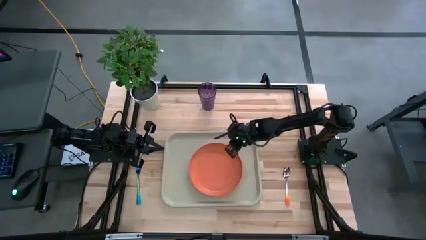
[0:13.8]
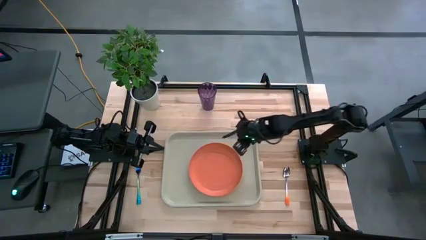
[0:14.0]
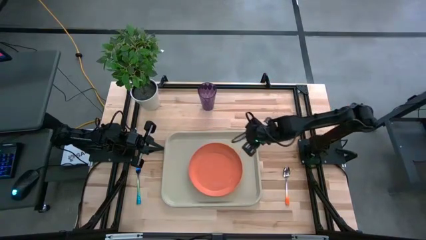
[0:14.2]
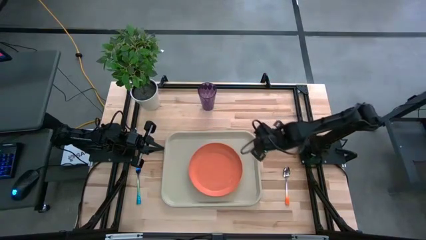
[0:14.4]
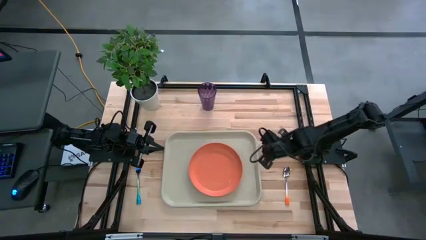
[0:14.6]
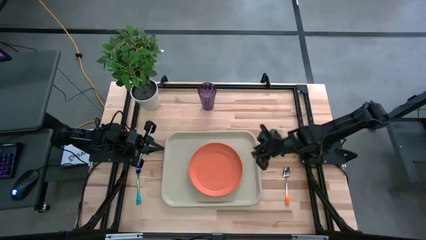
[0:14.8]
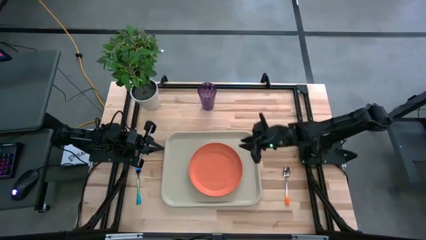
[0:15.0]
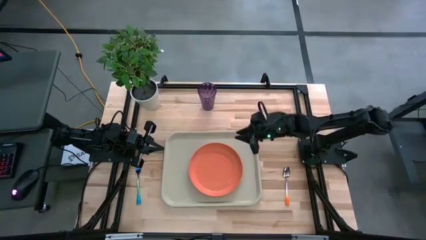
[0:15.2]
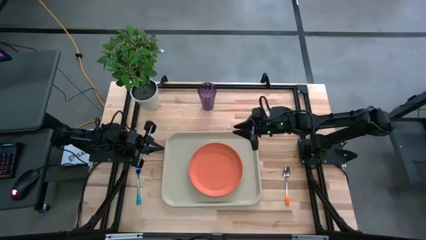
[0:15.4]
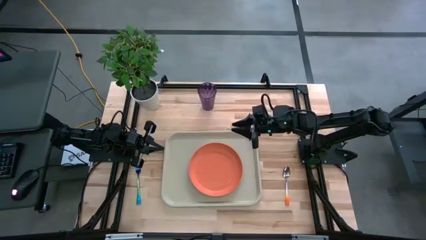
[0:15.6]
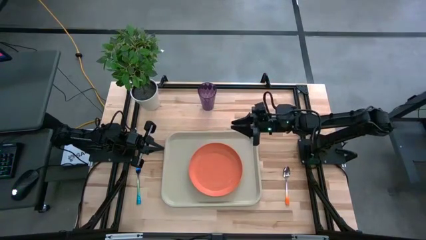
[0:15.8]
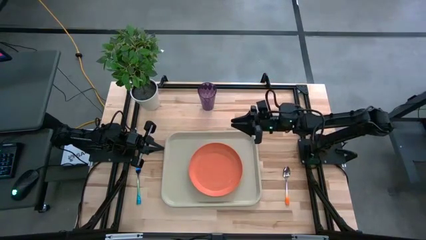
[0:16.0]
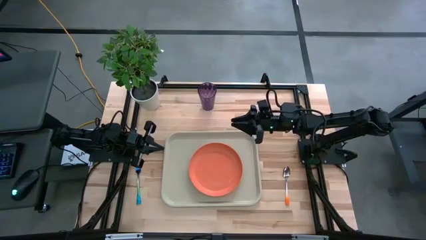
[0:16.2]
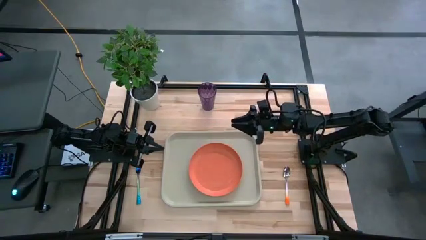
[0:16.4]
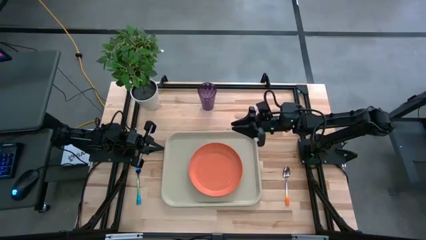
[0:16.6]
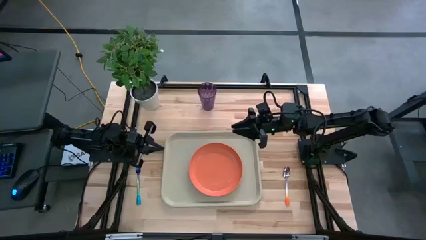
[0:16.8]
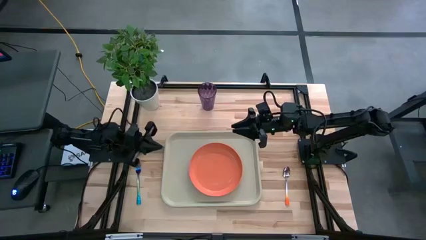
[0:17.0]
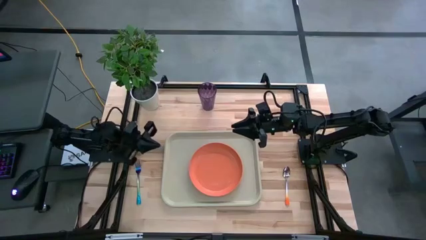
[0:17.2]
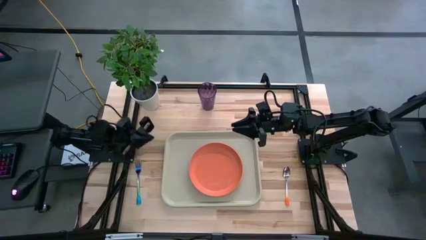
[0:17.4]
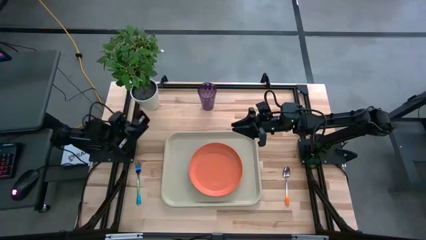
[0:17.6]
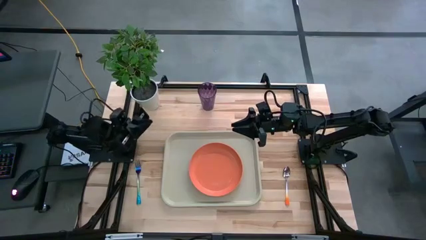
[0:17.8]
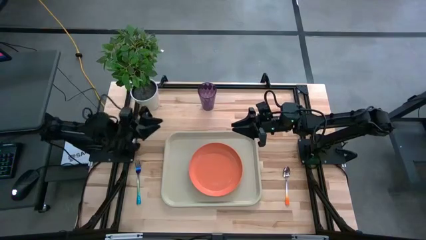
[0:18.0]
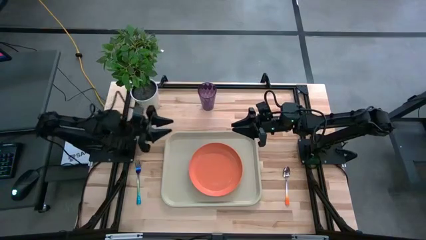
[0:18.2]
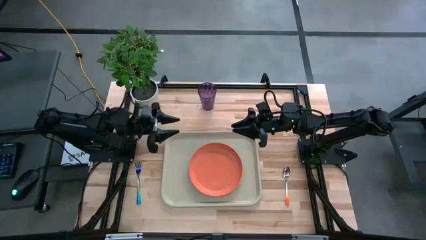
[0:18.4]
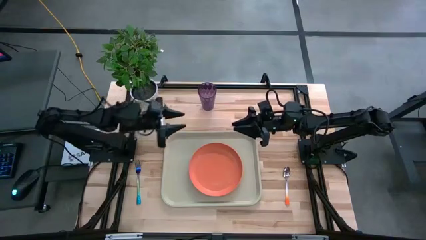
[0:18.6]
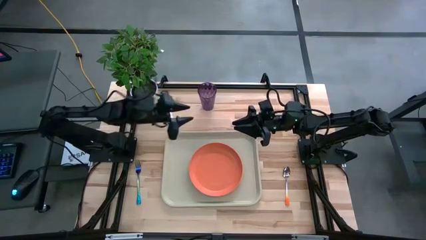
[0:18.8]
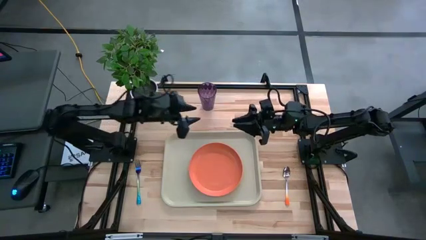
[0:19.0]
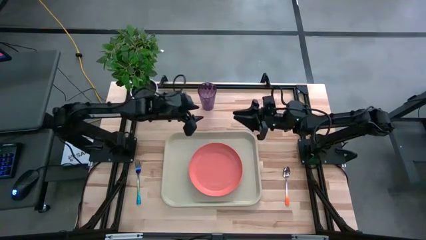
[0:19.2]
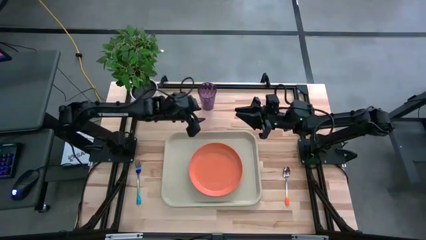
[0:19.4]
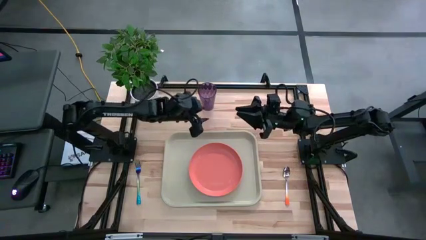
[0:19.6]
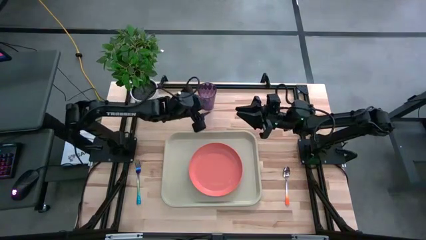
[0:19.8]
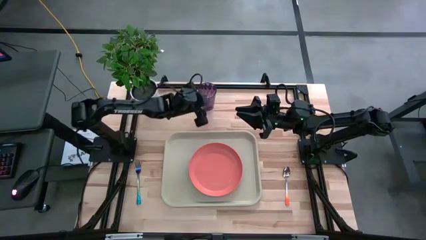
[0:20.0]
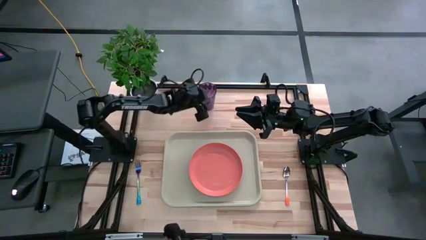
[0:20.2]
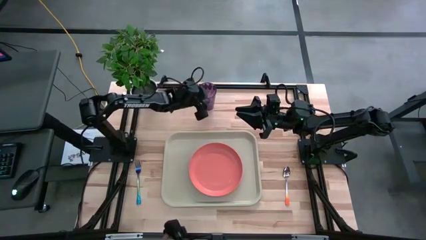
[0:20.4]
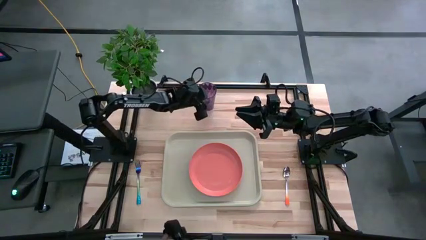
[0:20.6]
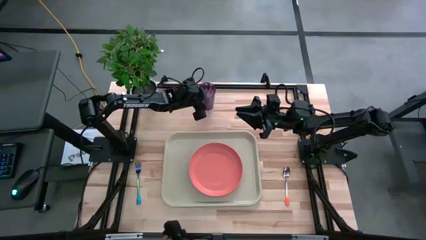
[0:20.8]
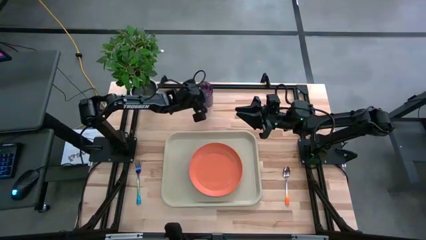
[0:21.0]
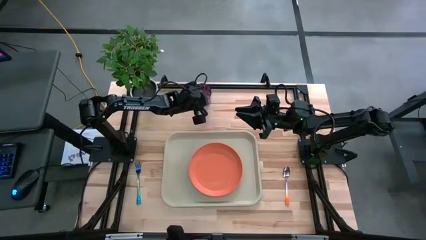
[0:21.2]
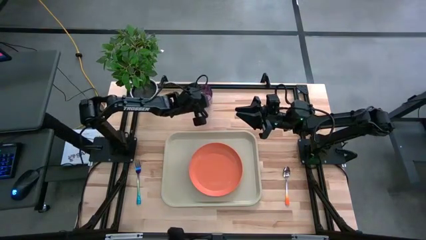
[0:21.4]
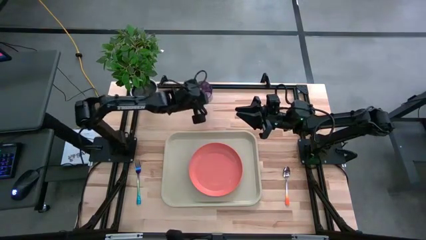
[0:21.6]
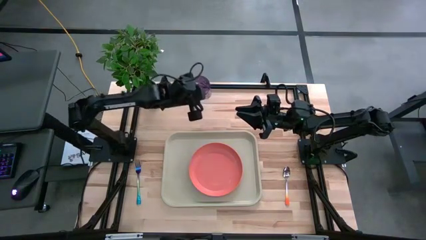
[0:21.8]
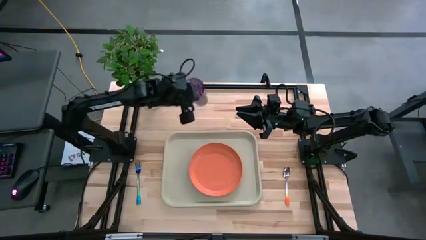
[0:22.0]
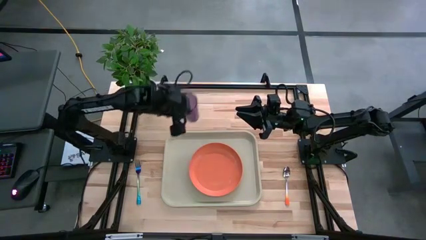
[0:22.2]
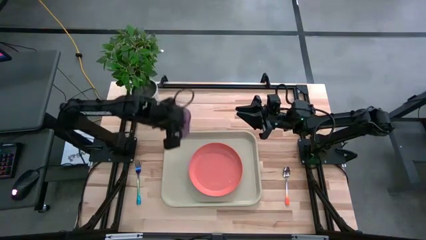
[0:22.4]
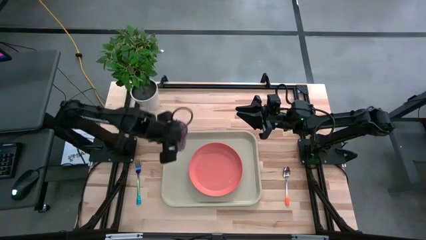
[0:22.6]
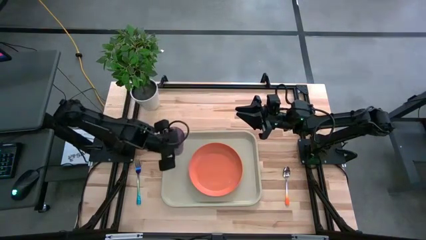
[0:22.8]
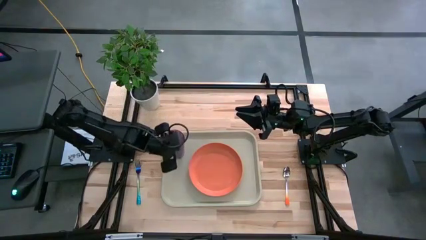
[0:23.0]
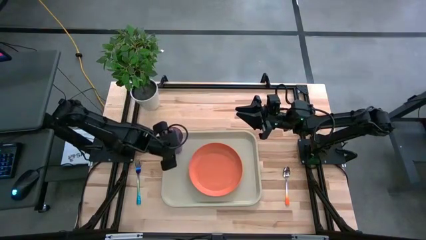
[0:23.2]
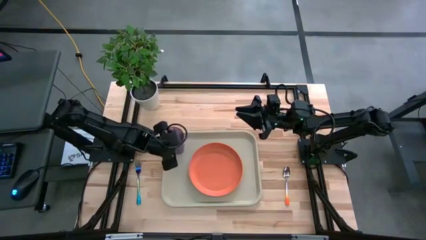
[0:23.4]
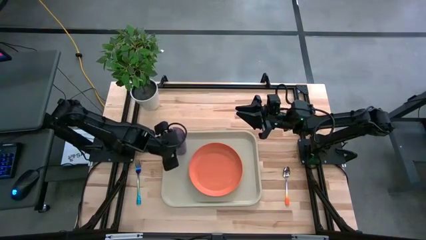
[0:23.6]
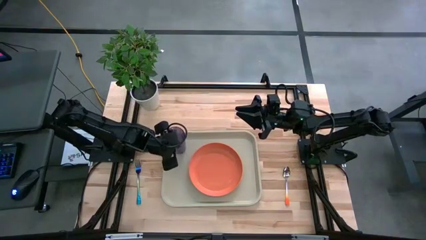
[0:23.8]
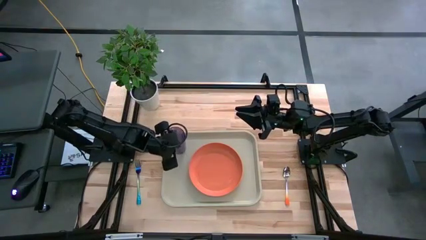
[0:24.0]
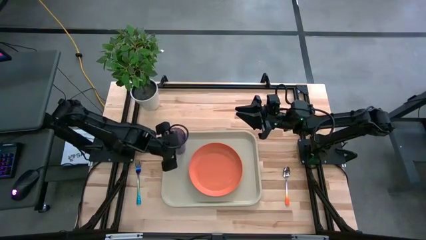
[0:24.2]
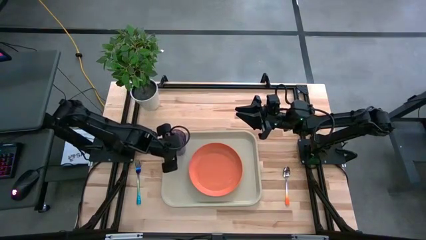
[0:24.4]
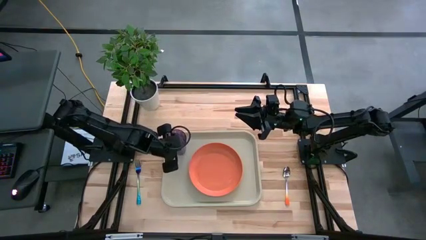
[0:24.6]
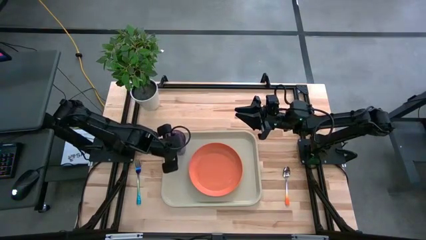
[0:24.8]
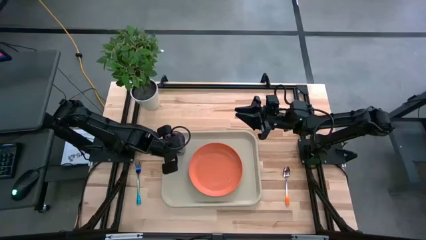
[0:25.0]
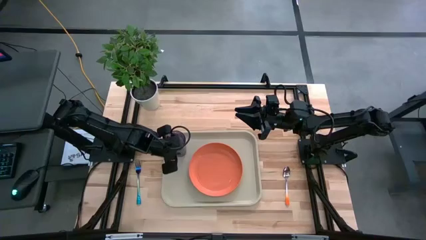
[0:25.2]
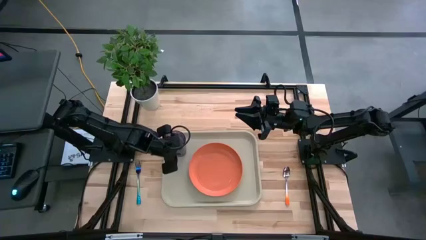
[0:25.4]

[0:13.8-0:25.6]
Task: Pick and place plate/cup/fork/spoon on tray
Put the purple cup to the top left side of the gray serving tray
